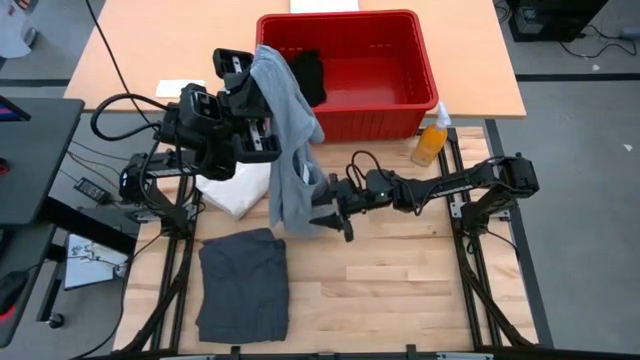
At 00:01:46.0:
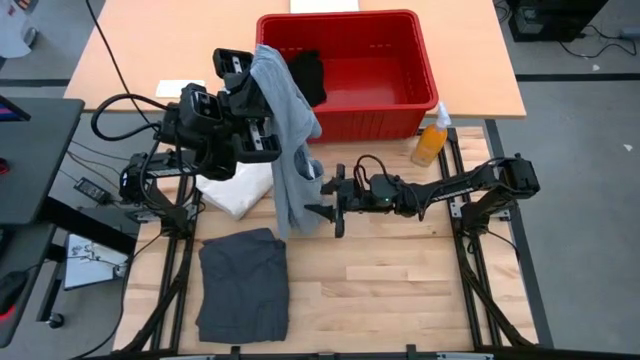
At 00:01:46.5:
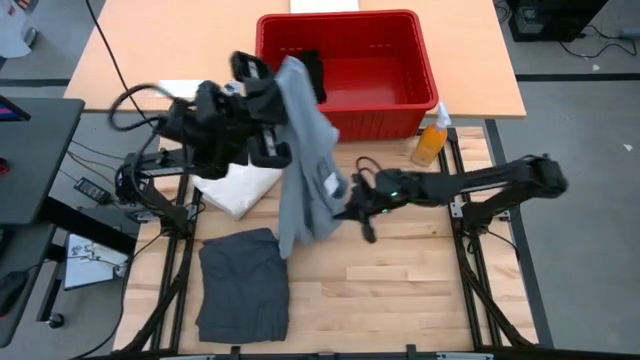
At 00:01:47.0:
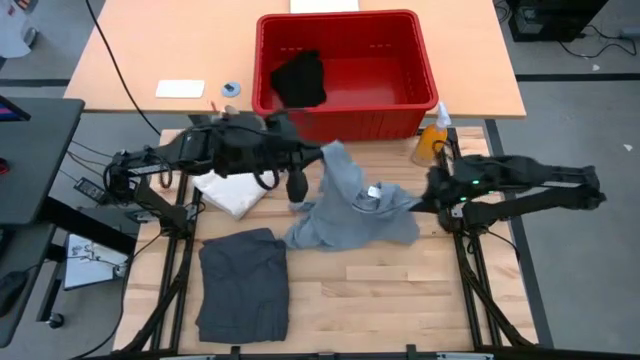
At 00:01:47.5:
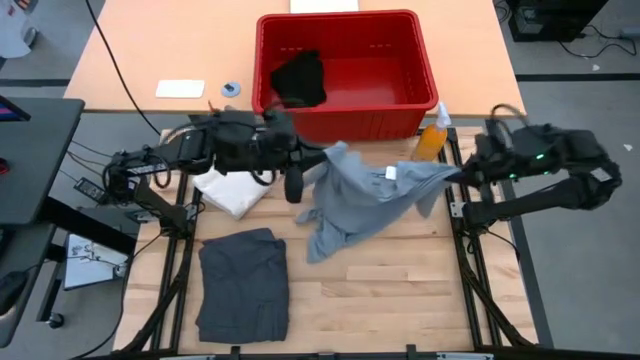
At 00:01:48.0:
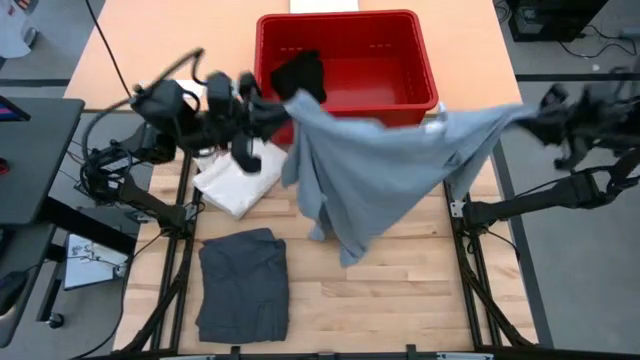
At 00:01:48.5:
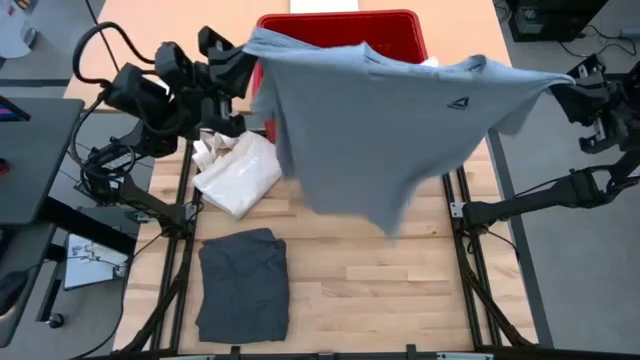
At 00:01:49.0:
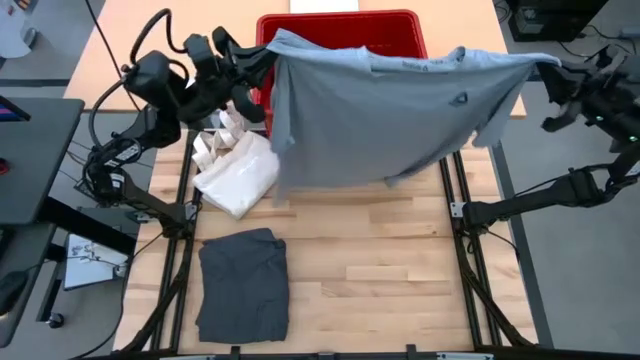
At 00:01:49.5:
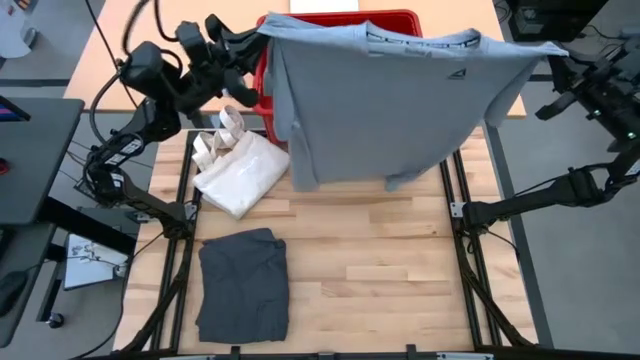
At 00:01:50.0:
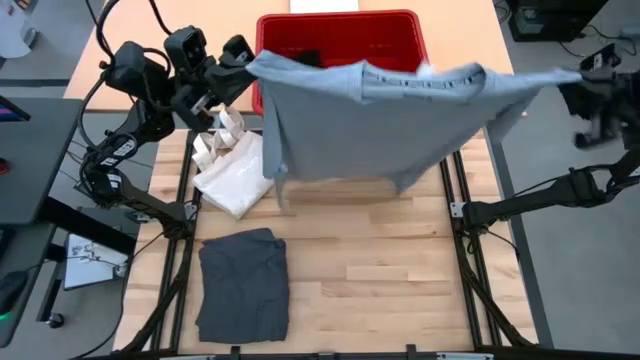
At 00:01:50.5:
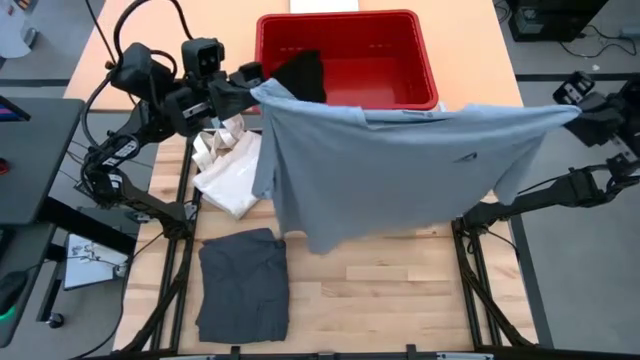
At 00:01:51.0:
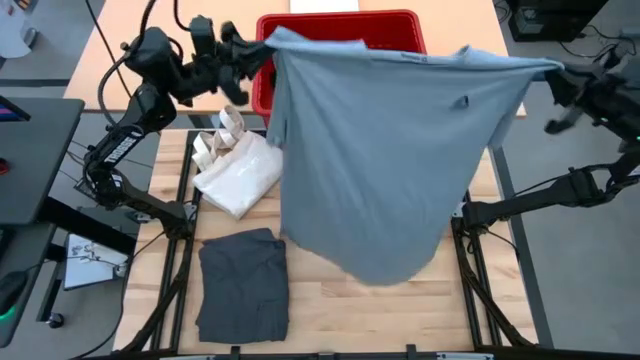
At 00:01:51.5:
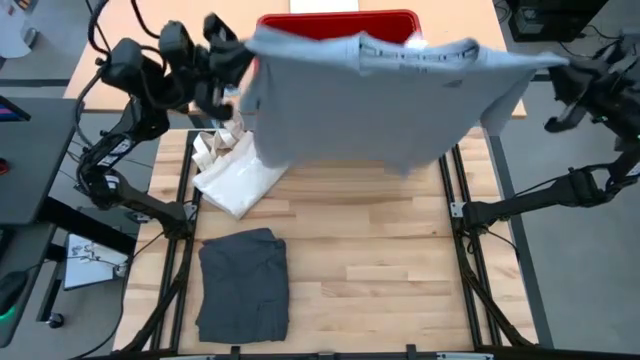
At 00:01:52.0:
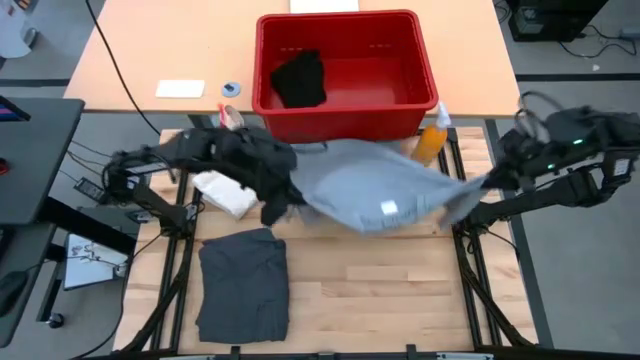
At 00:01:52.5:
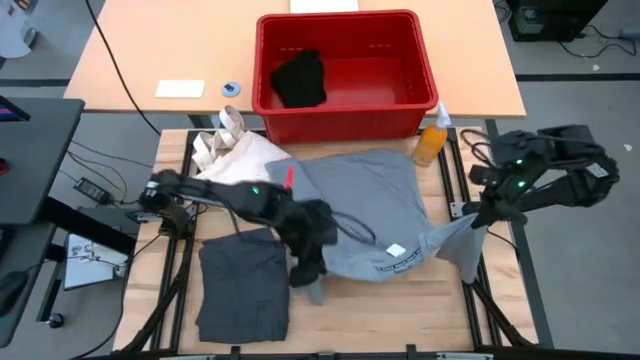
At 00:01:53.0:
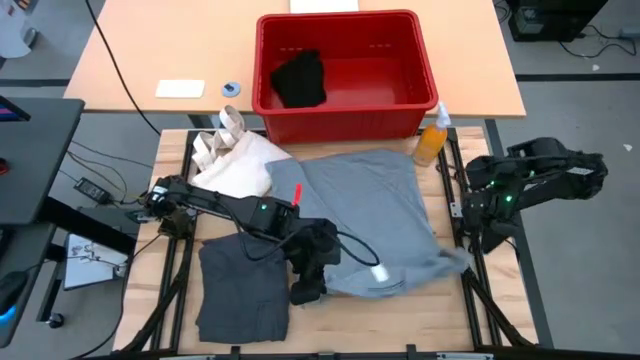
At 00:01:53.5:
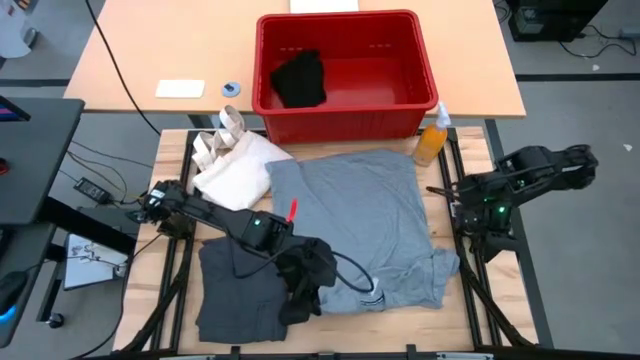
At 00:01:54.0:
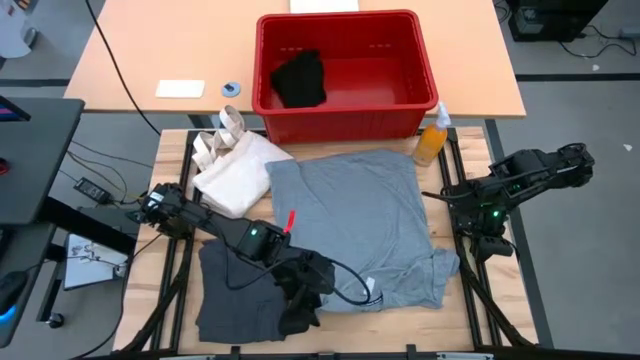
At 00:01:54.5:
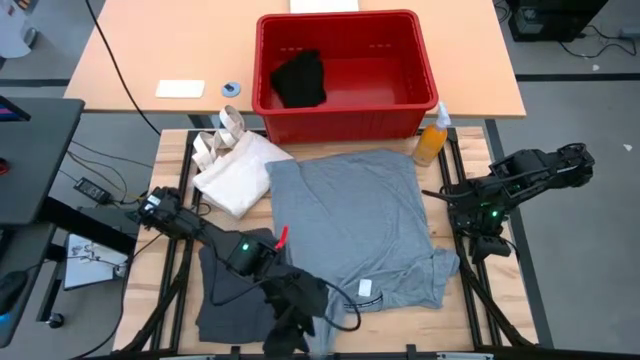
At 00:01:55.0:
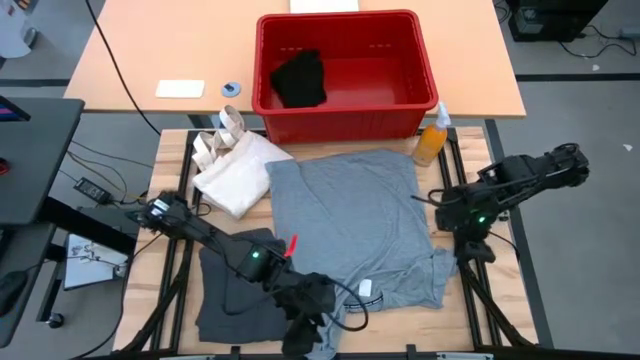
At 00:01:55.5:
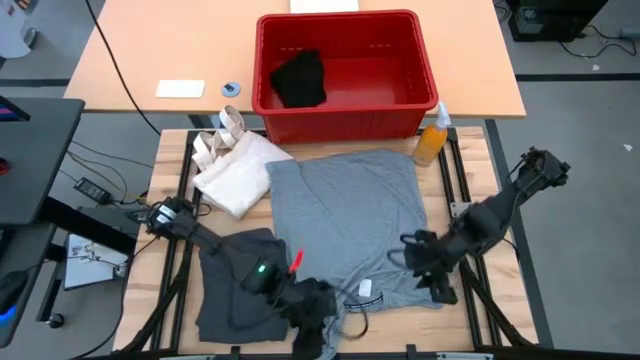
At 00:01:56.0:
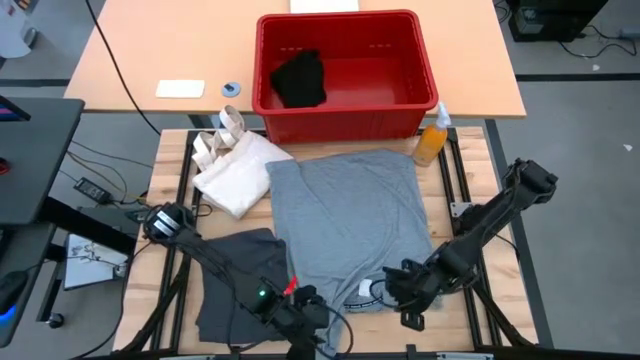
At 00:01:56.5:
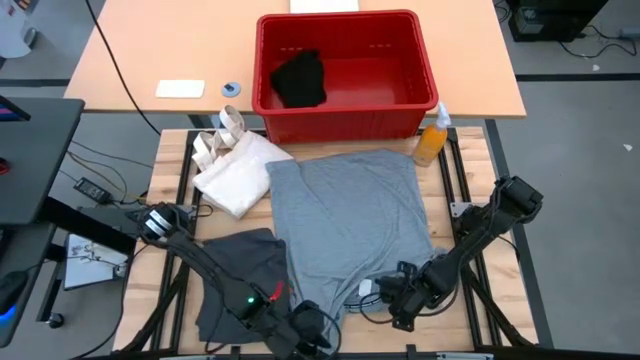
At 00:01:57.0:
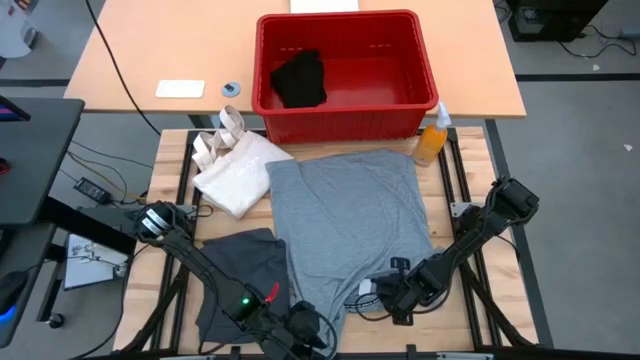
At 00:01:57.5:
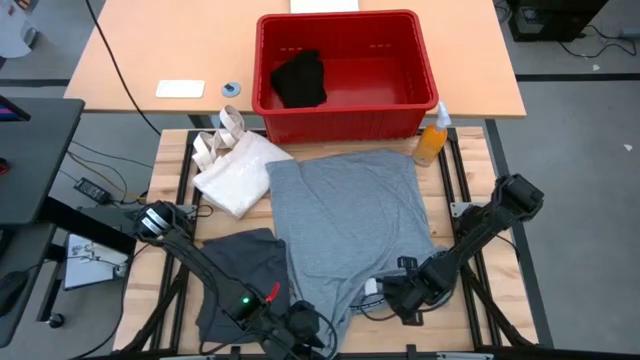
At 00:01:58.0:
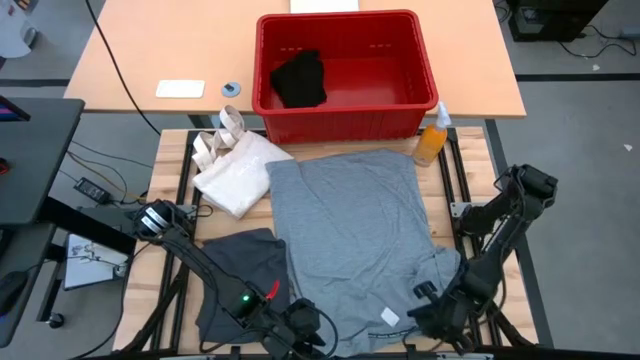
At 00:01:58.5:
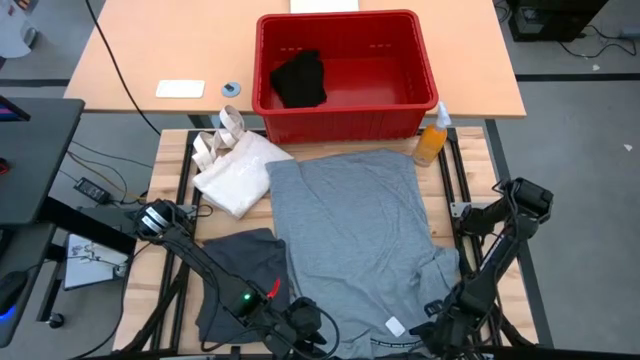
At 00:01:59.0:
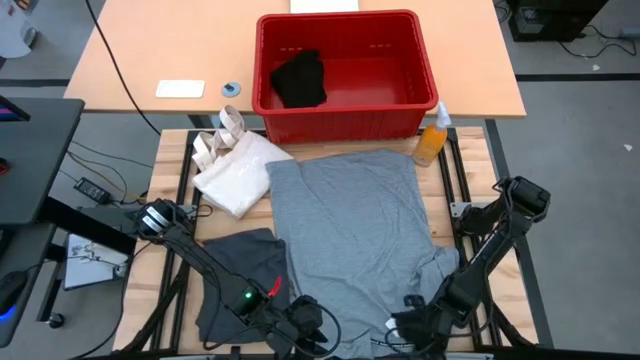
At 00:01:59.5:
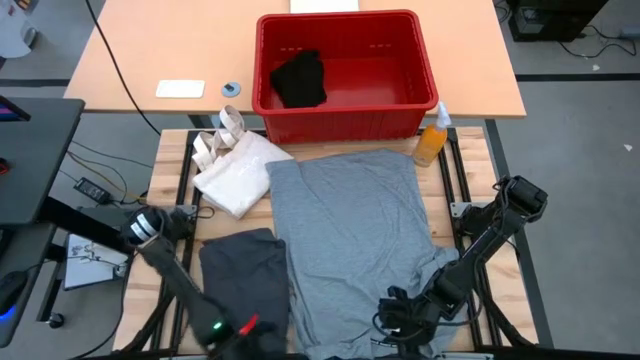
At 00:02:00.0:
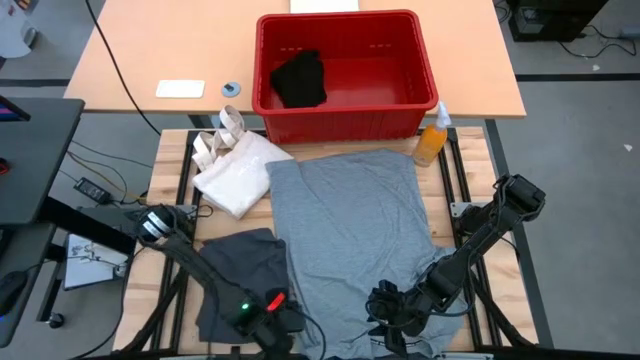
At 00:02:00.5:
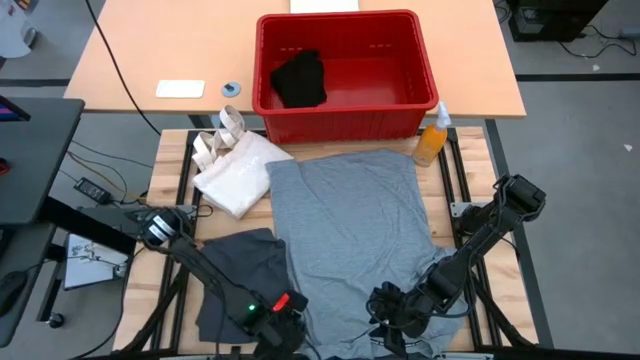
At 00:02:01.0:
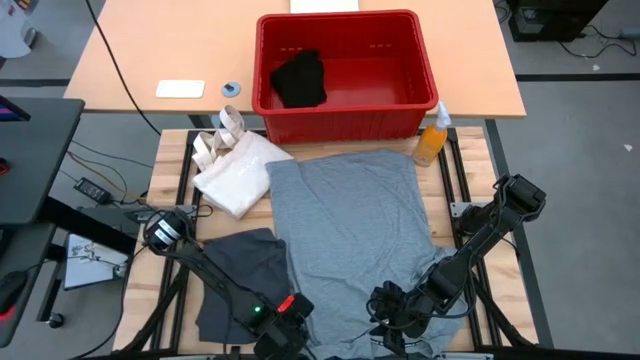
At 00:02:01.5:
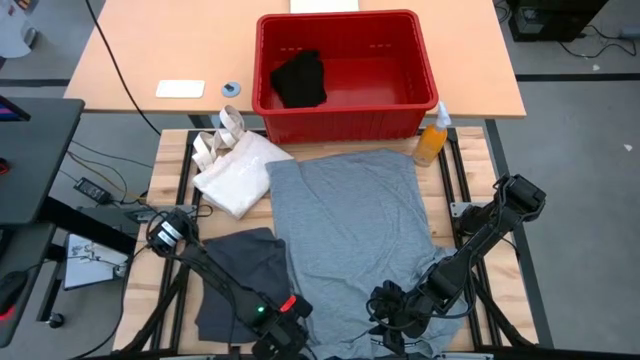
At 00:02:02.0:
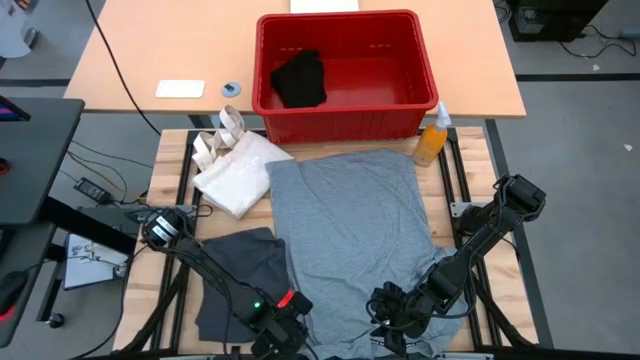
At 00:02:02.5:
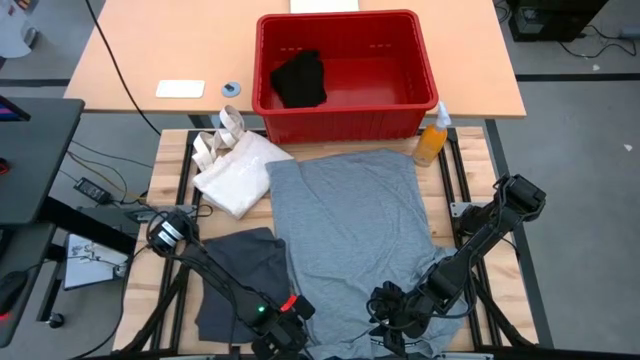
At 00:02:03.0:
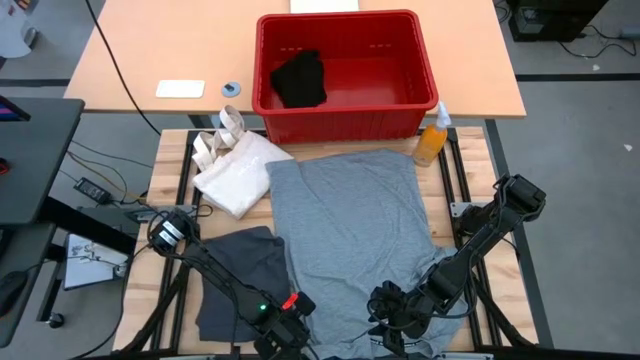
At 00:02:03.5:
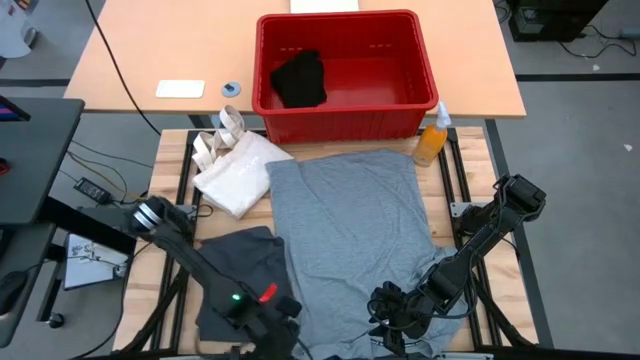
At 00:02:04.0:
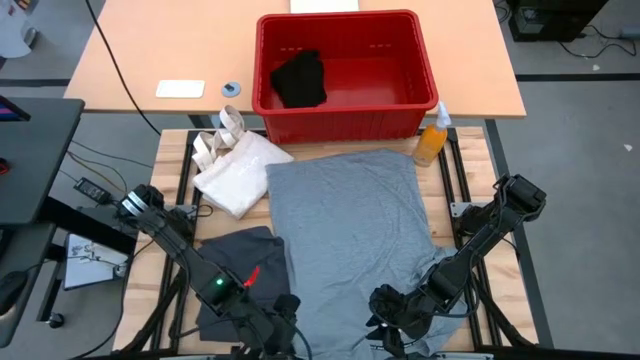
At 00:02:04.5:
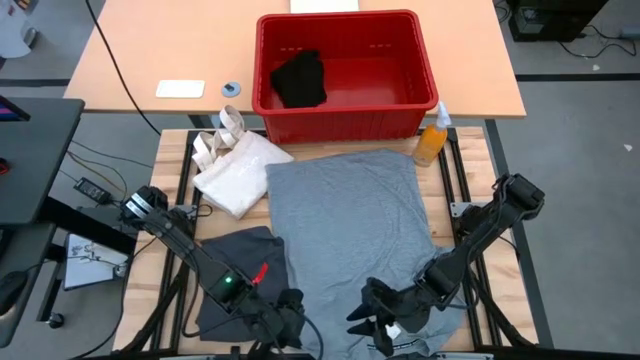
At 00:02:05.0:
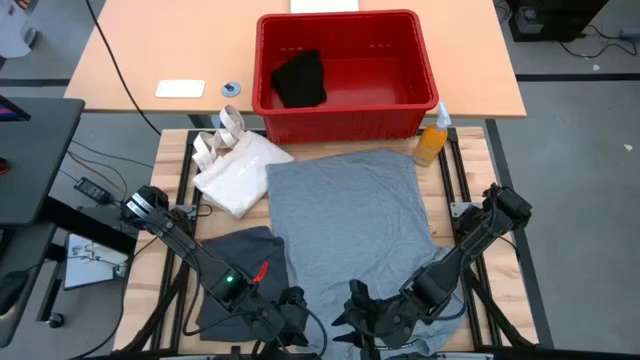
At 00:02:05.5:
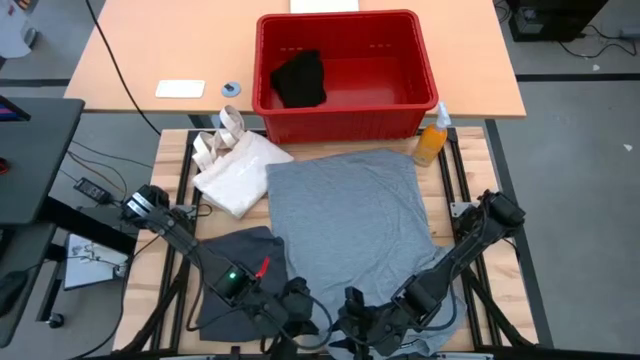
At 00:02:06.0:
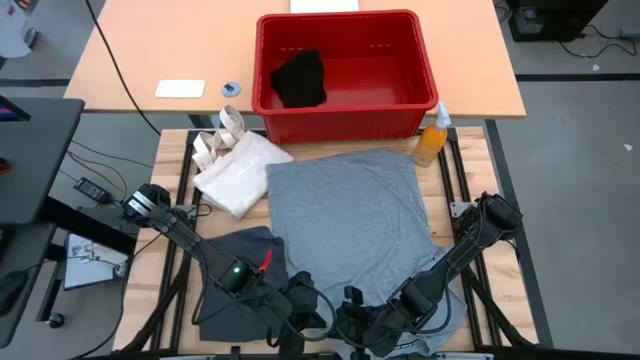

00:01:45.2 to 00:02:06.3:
Task: Fold Laundry from Bin
Fold the light gray t-shirt
